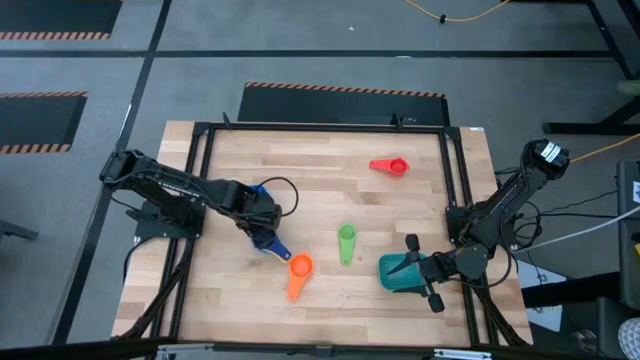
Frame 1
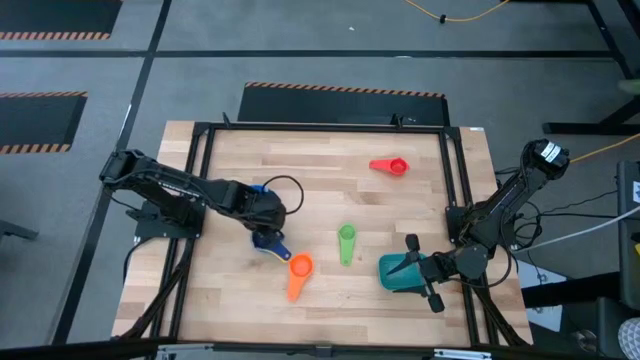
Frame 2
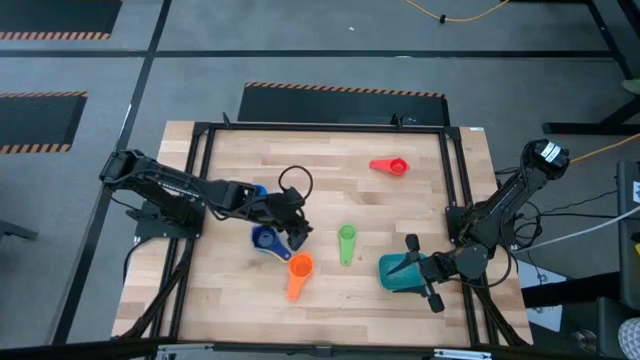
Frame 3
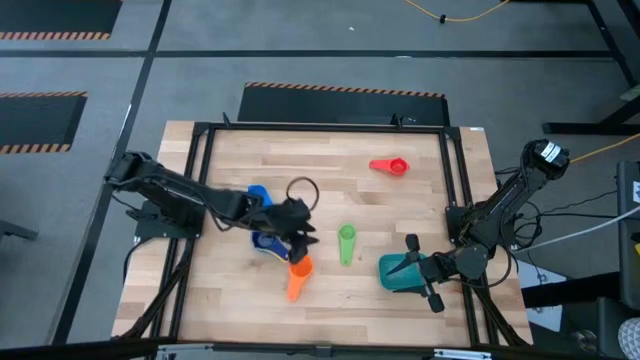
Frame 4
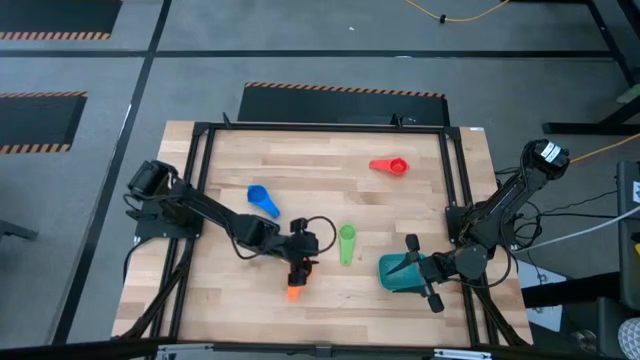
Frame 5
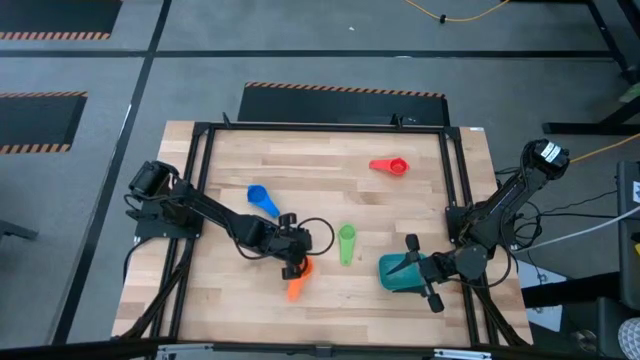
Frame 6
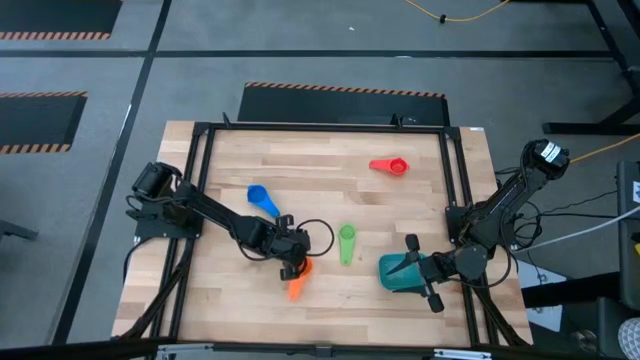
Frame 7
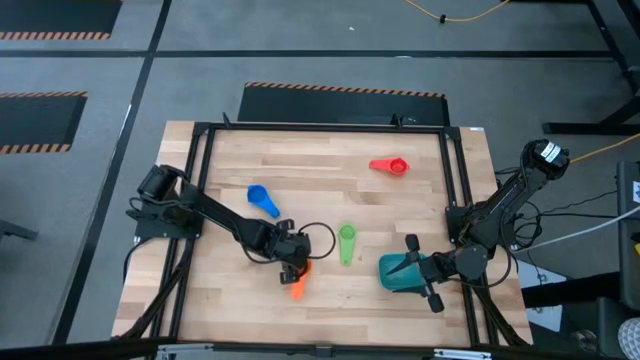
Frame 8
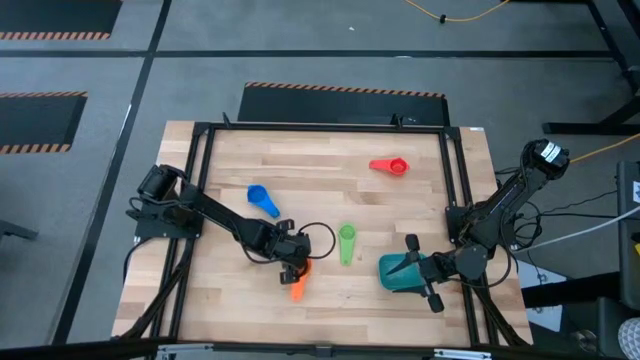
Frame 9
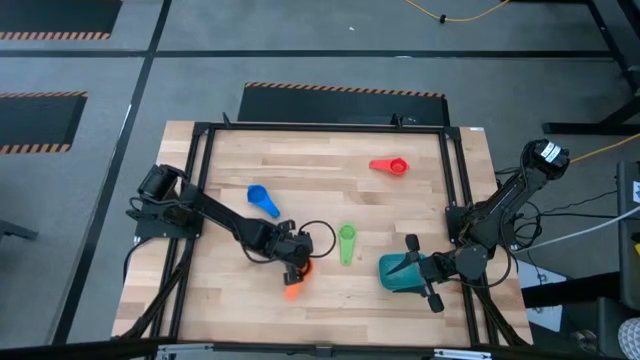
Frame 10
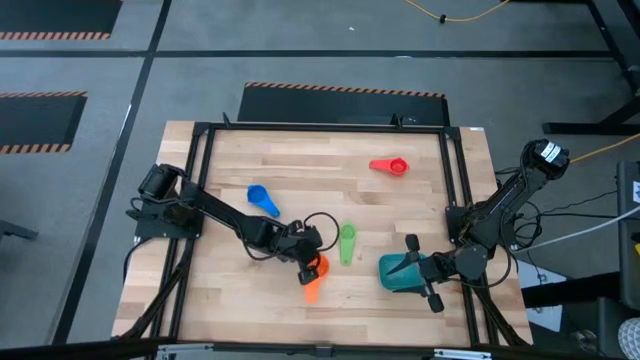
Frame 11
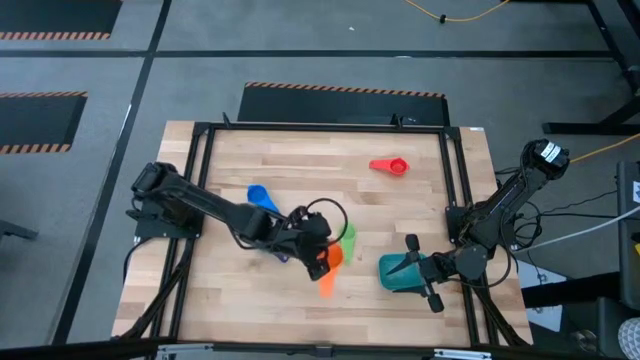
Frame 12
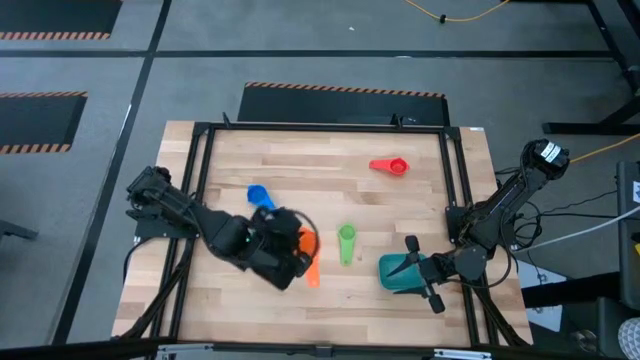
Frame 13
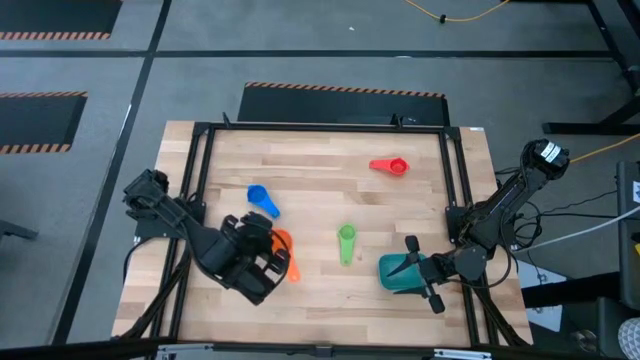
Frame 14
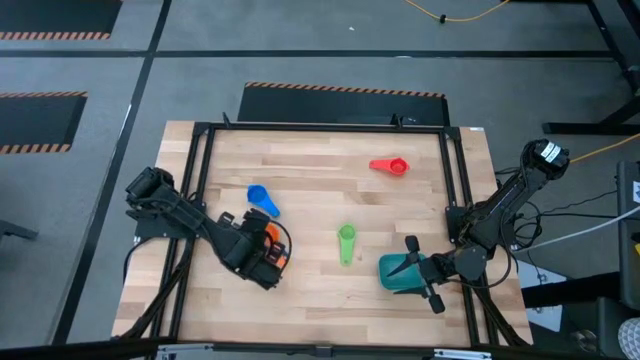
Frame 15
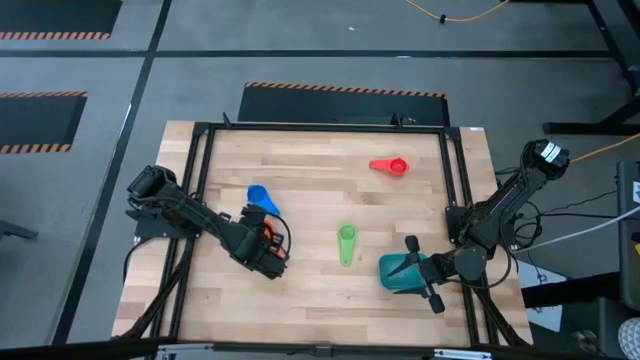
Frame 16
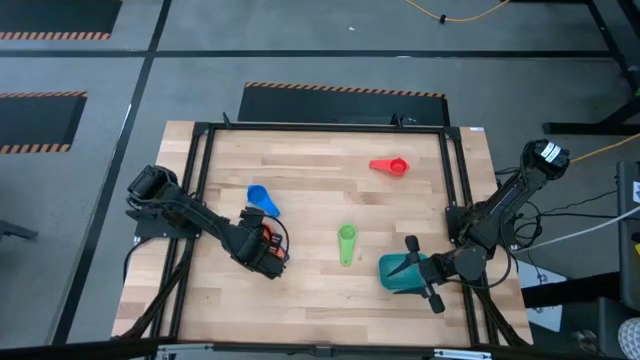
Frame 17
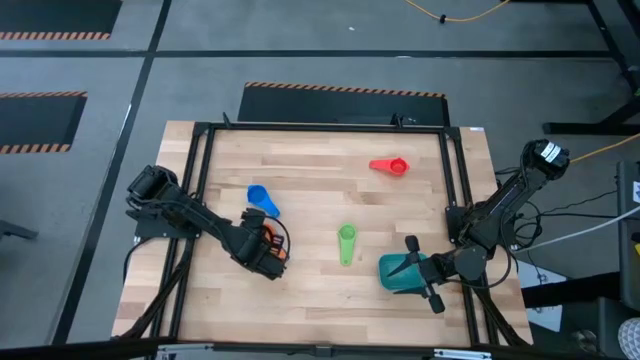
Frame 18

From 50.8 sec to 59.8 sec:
Task: Nest measuring cups in basket
Stack the orange measuring nest cup into the dark blue measuring nest cup

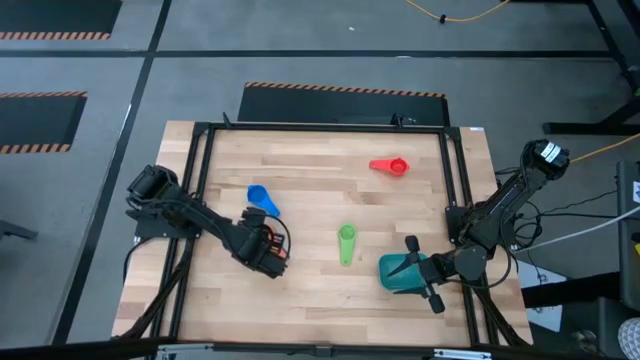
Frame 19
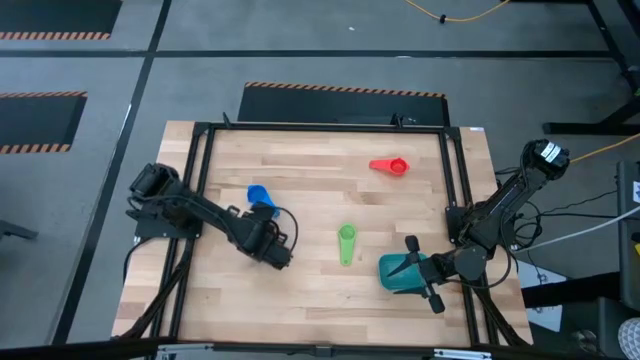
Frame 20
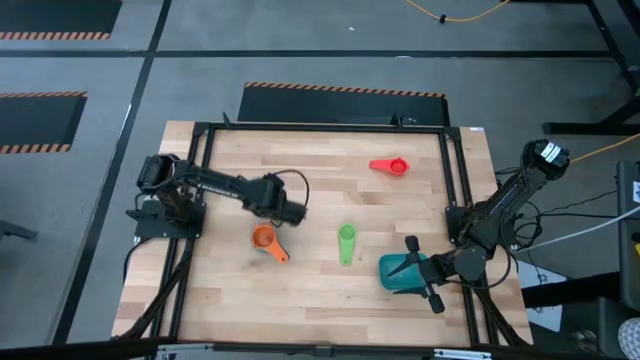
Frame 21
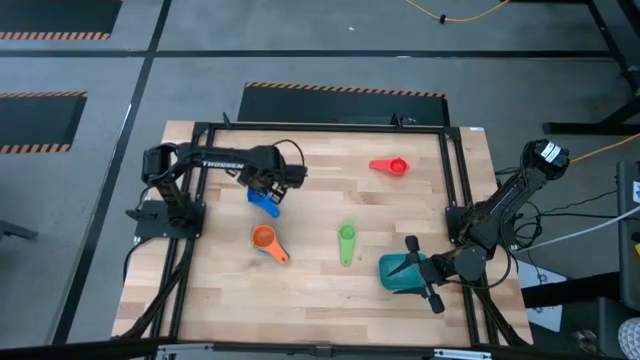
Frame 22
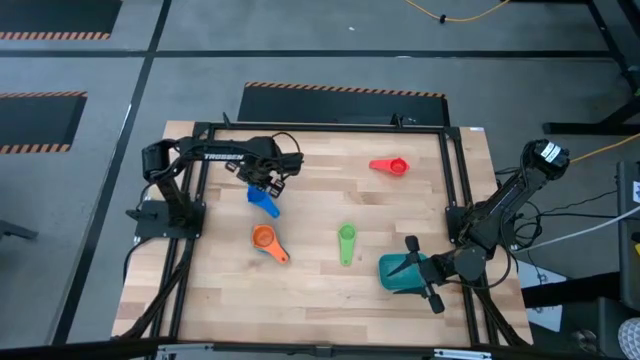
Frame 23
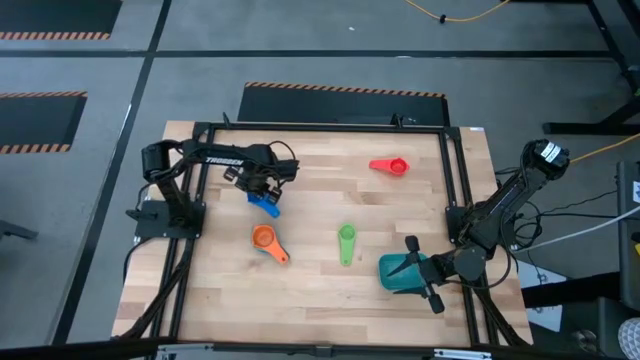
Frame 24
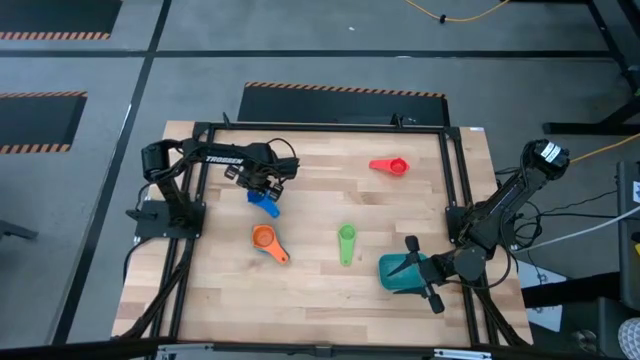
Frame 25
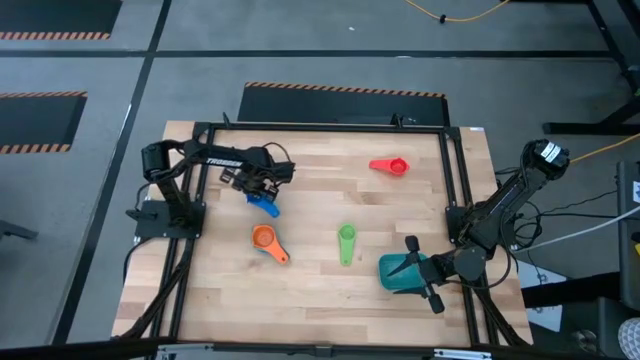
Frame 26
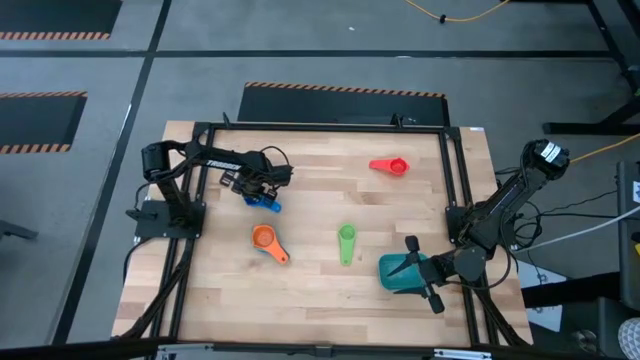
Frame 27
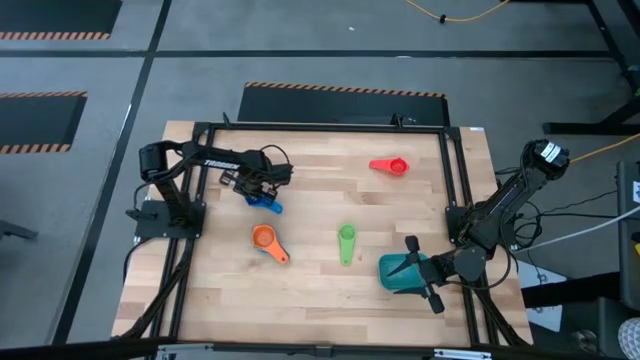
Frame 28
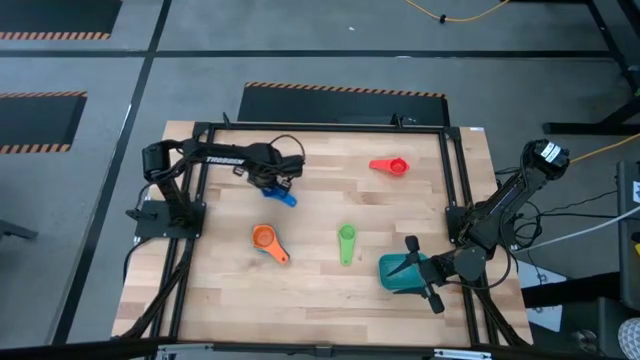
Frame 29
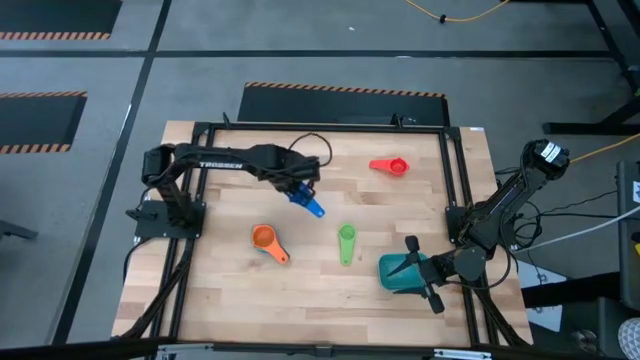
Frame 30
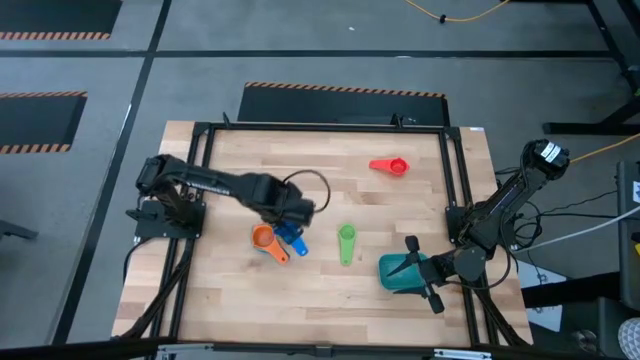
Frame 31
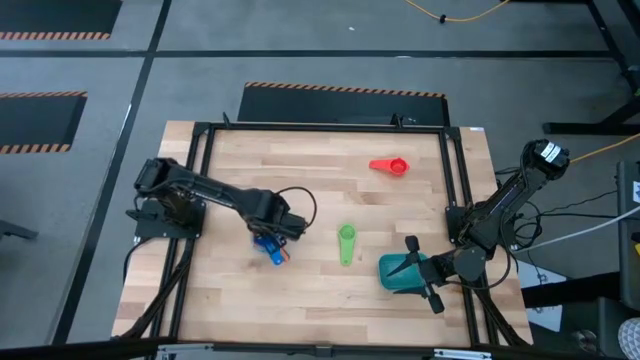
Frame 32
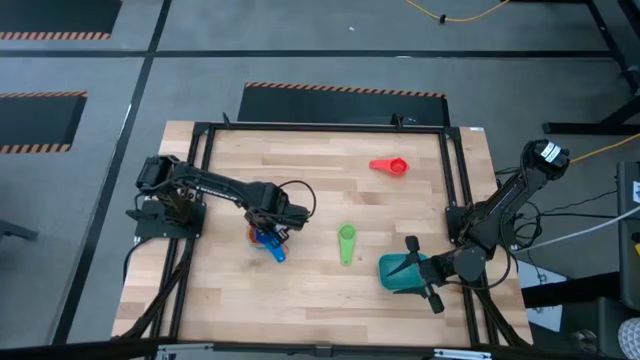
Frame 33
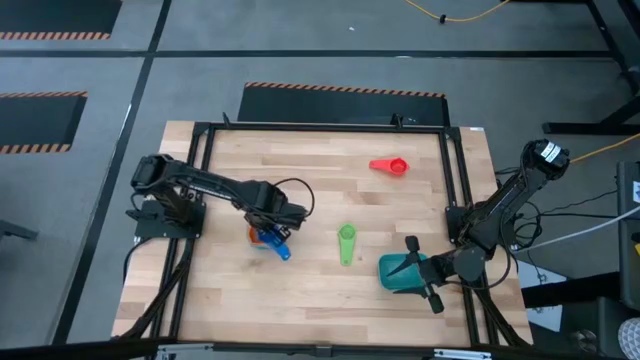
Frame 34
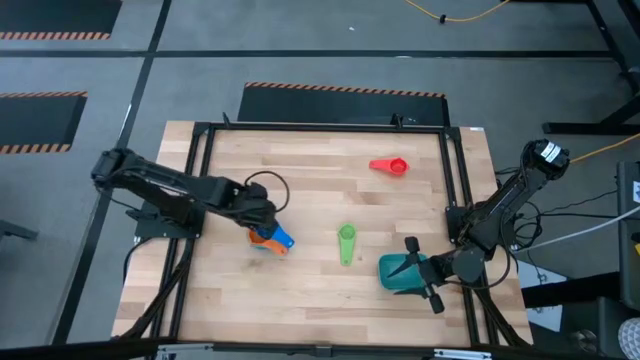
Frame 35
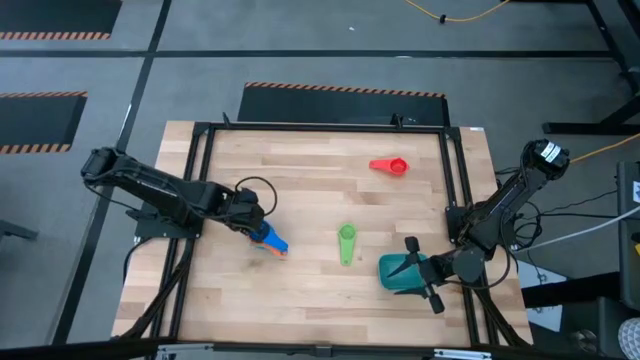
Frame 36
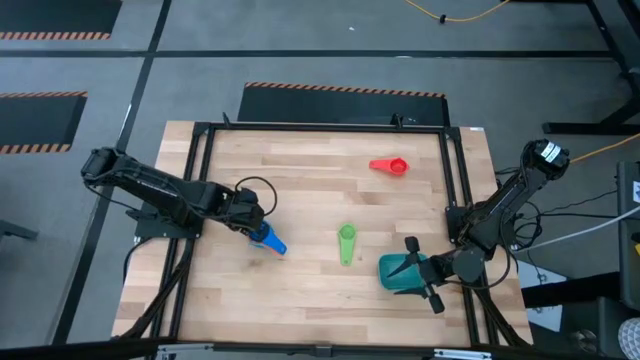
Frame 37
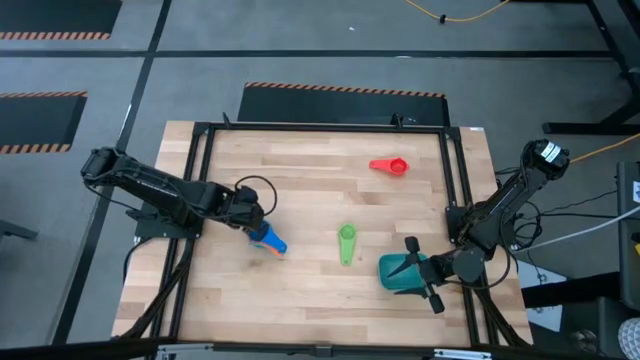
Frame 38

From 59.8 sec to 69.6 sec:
Stack the blue measuring nest cup into the orange measuring nest cup

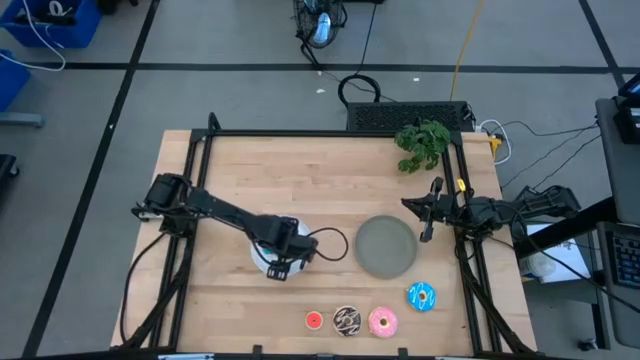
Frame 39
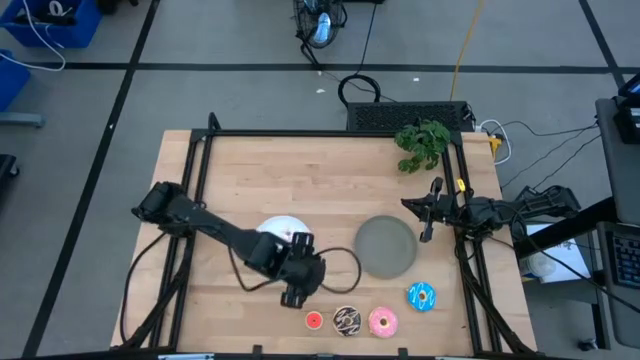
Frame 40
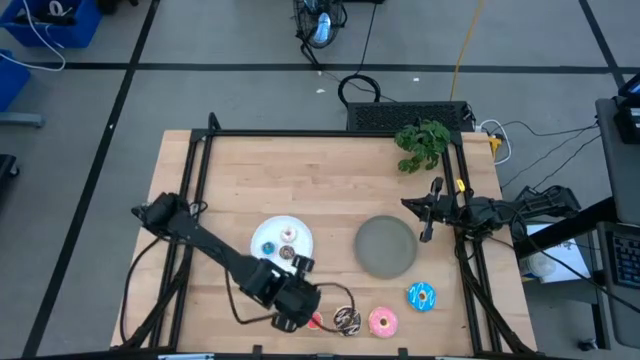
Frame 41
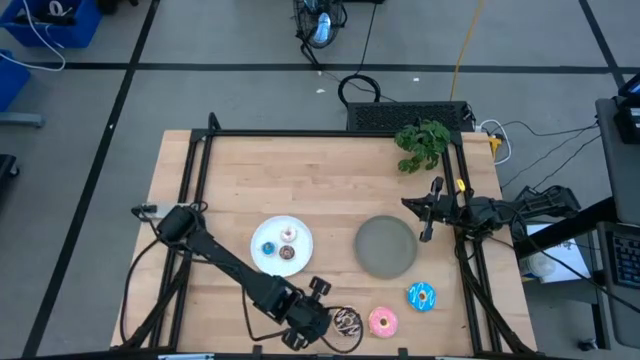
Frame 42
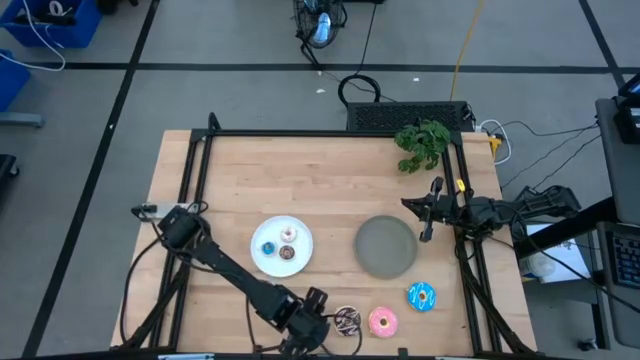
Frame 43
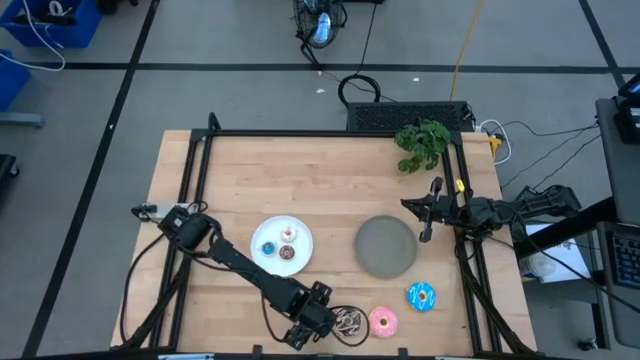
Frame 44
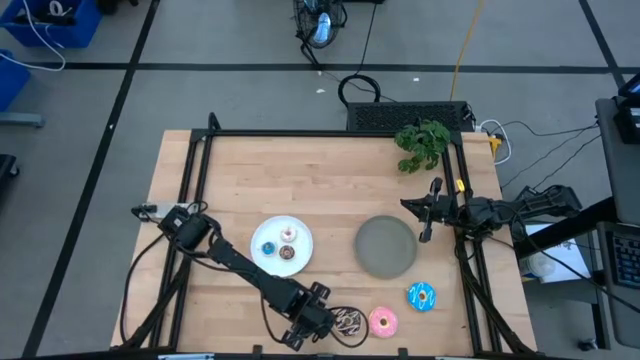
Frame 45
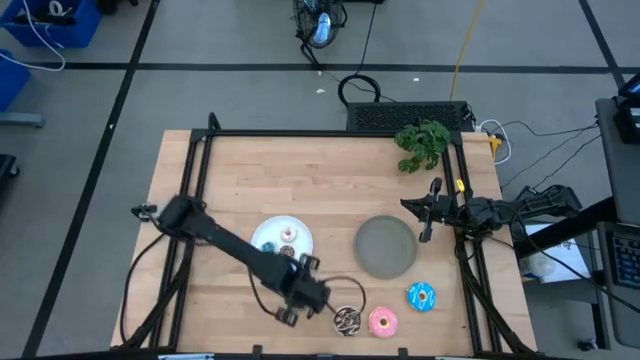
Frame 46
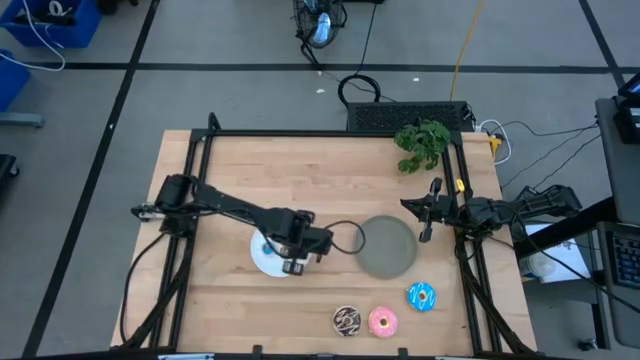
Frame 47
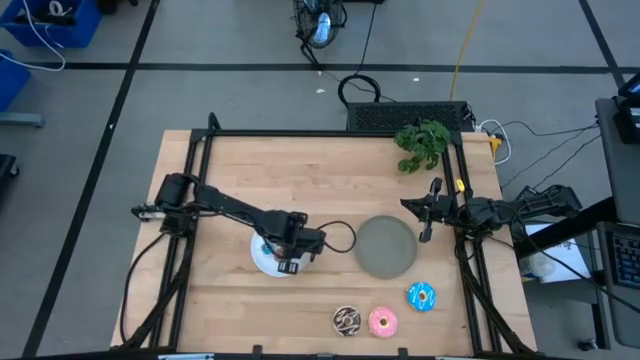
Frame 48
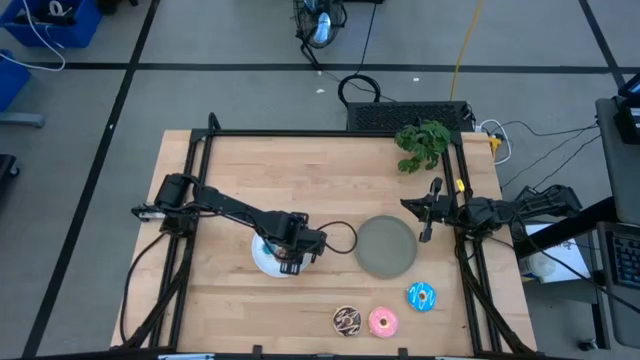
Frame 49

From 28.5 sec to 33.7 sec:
Task: Pick & Place donuts
Put the small orange donut on the white plate
